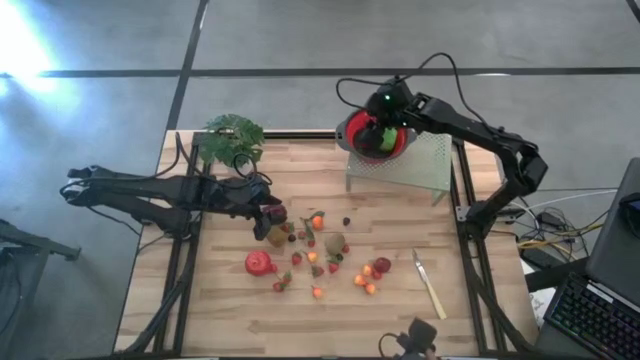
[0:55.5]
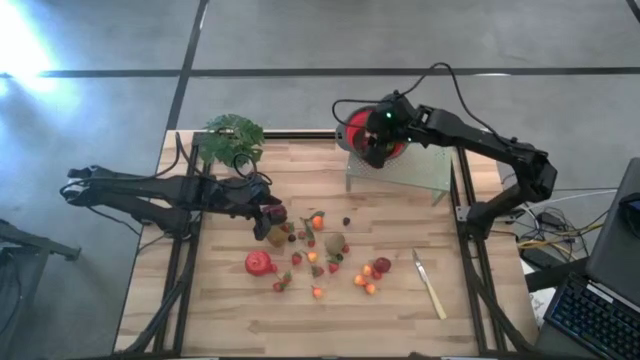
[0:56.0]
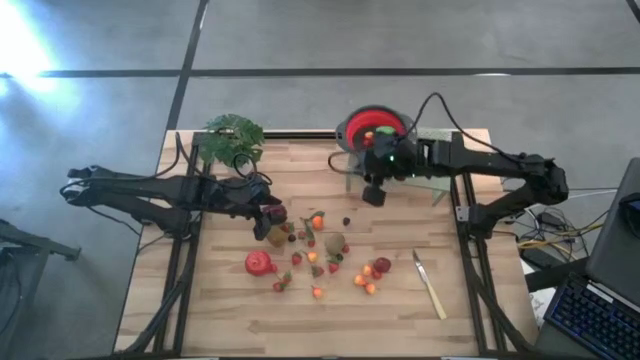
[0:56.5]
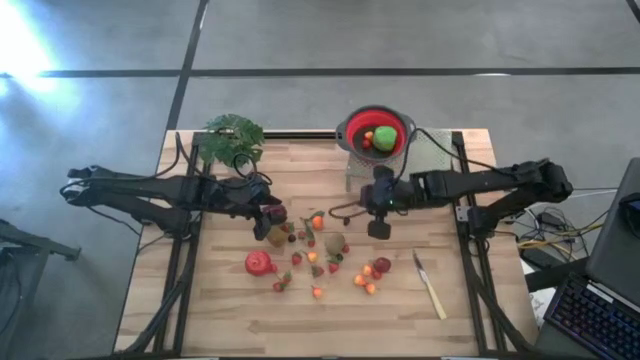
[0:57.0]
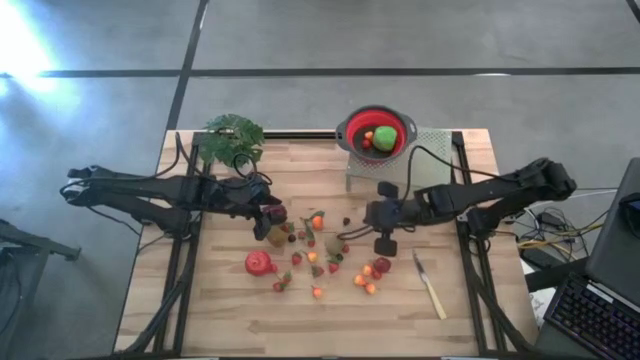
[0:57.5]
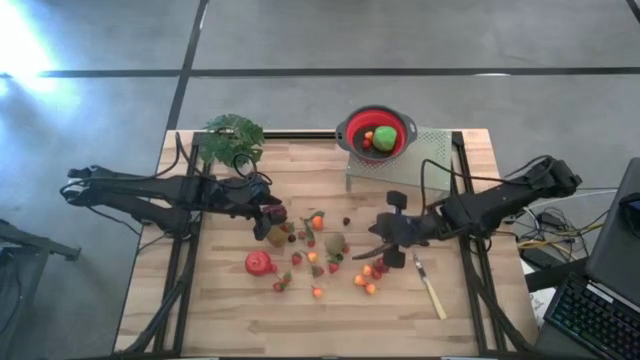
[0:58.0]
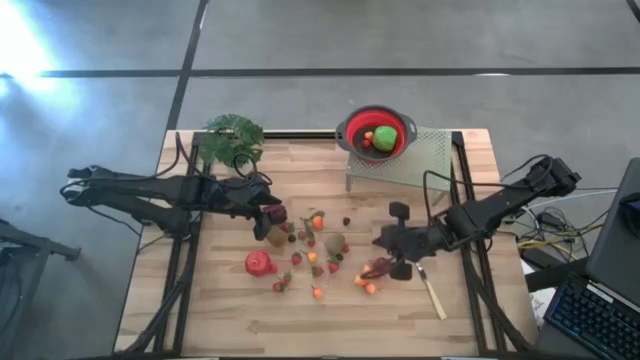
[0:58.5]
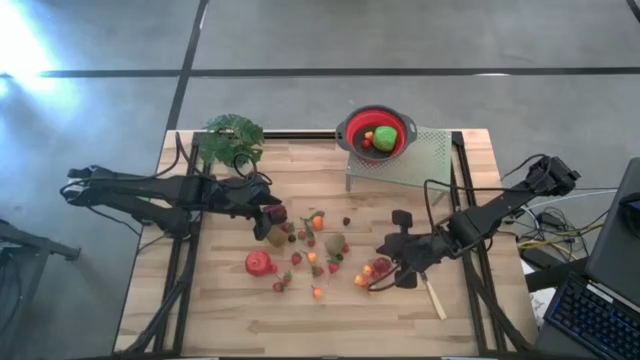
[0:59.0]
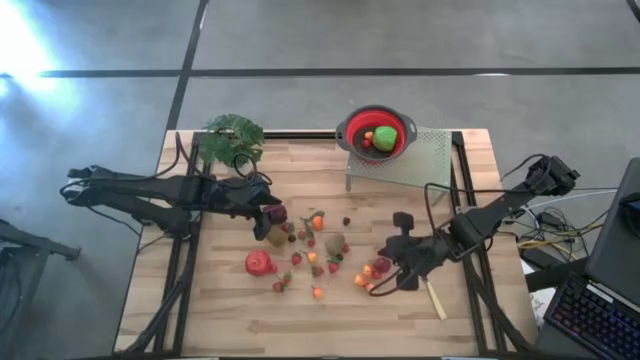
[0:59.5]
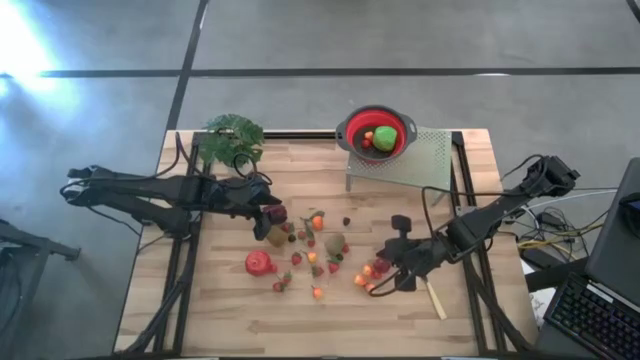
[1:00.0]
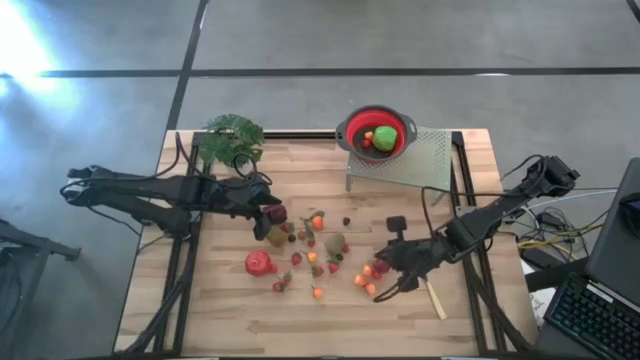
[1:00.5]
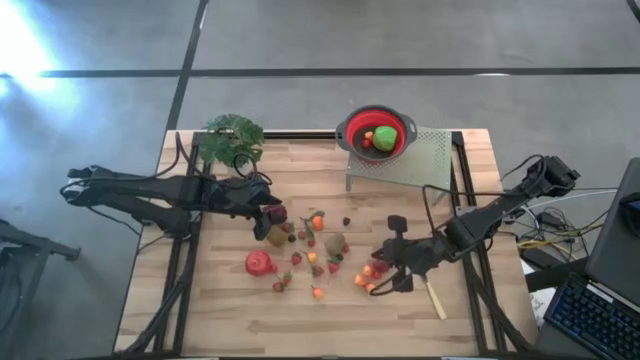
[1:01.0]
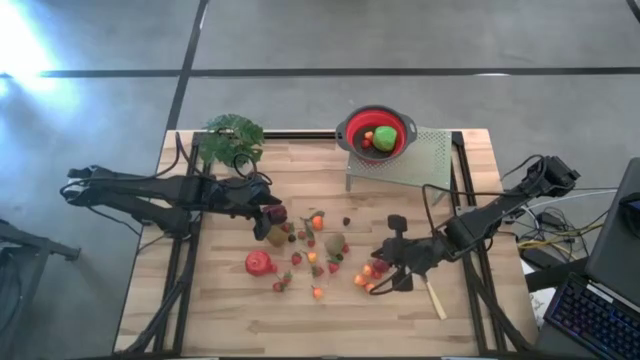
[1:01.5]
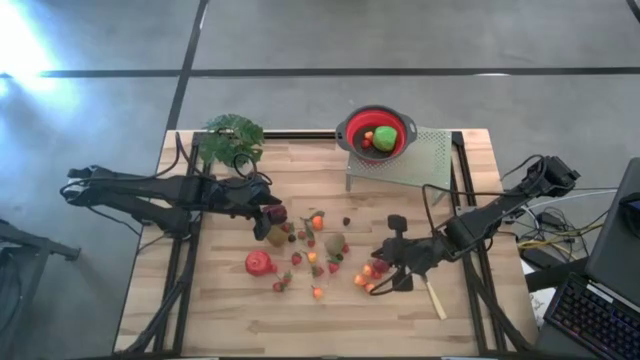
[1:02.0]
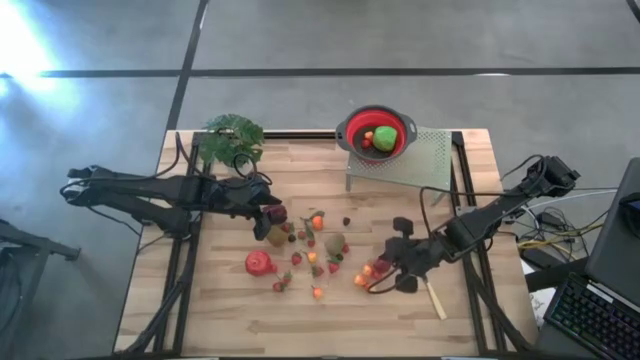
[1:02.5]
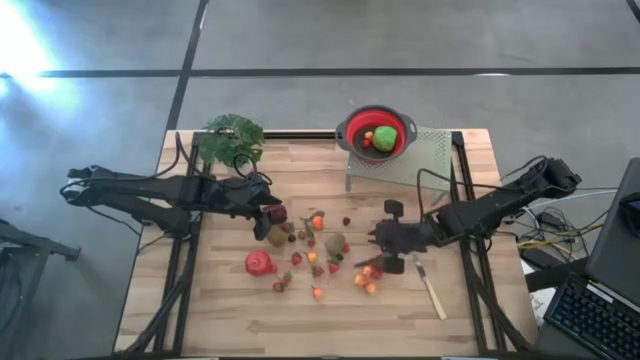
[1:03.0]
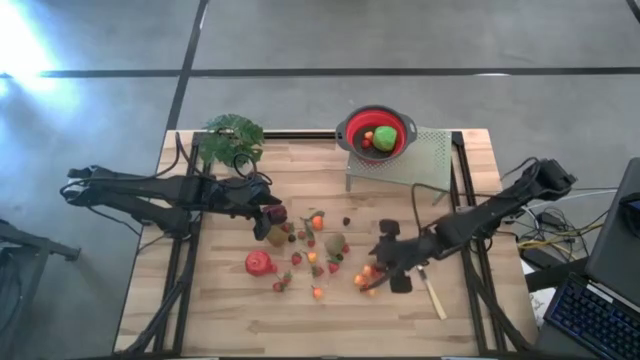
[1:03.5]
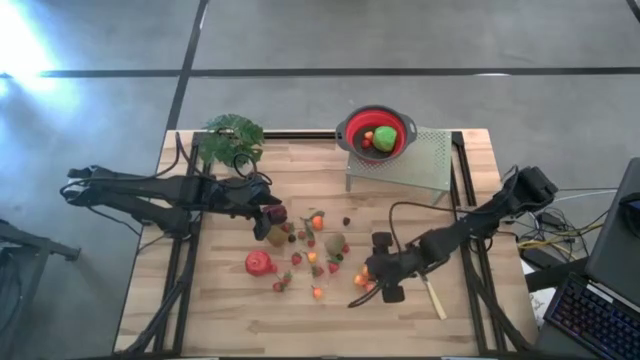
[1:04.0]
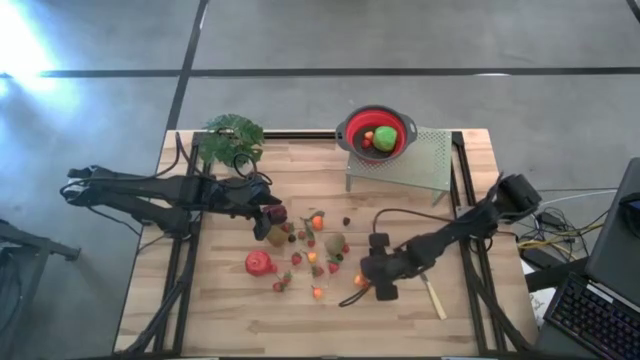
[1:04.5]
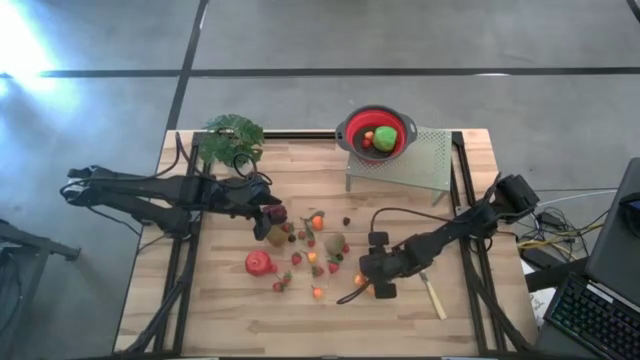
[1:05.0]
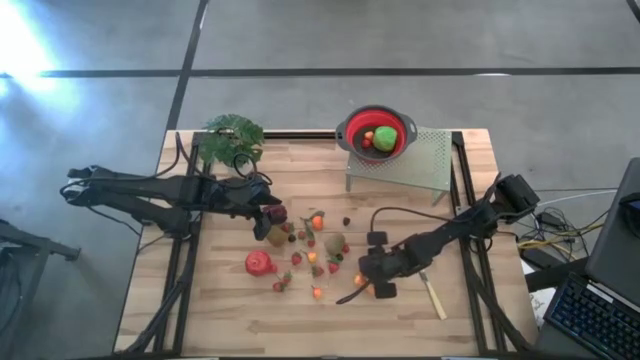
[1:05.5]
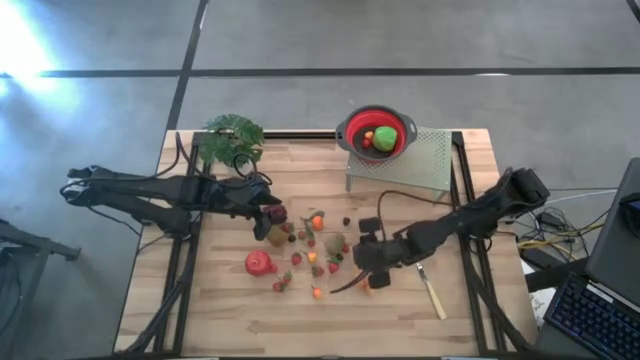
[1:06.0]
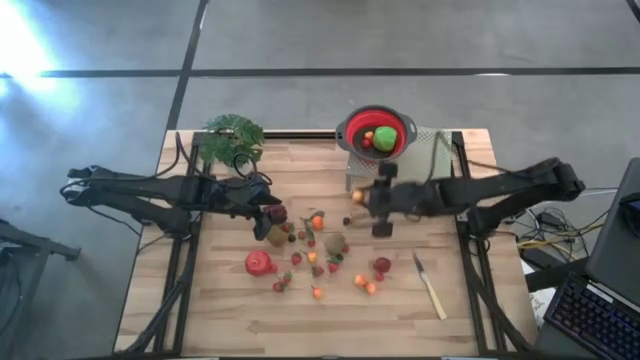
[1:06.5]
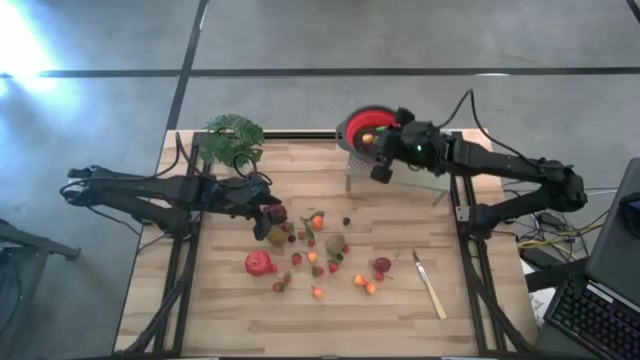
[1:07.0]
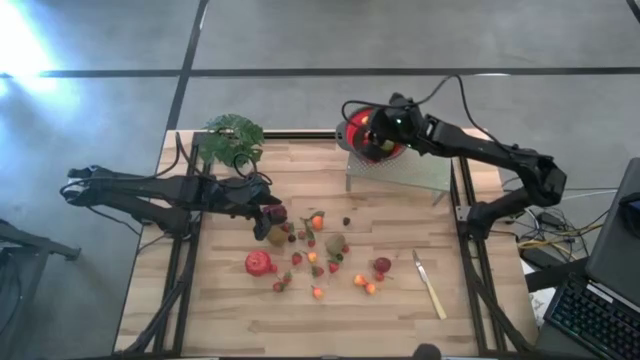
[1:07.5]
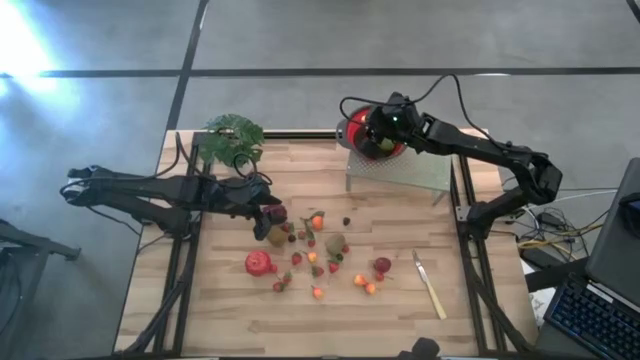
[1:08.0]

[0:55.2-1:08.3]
Task: Pick & Place Fruit
Put the pear into the strainer bowl on the shelf

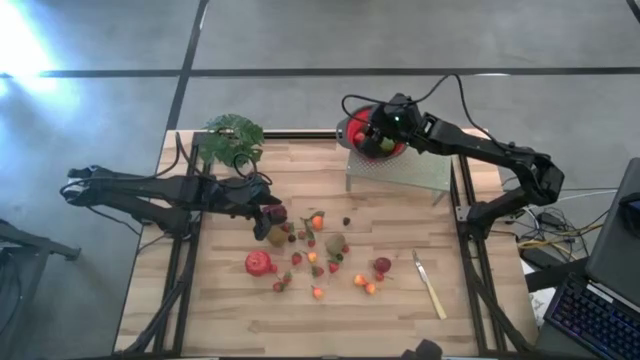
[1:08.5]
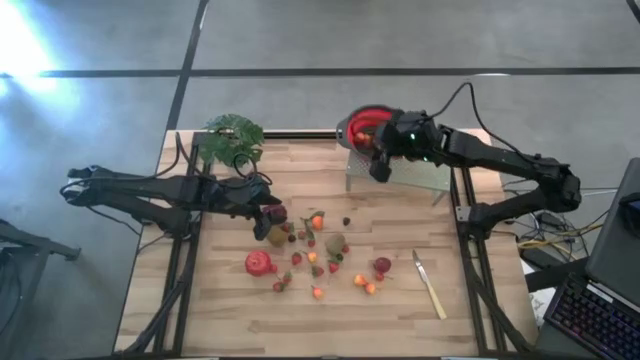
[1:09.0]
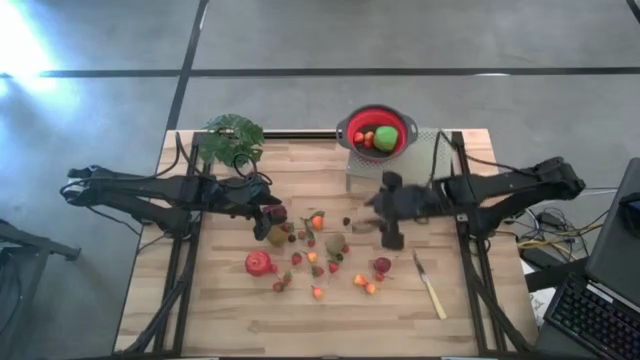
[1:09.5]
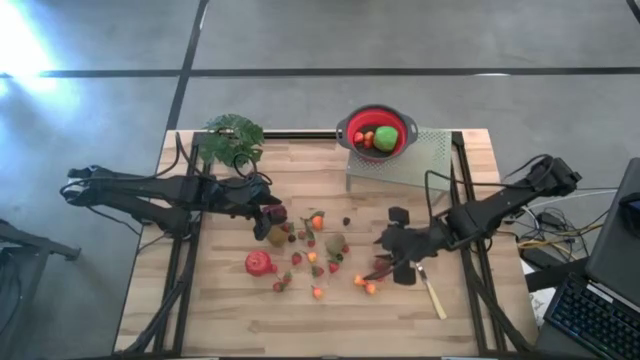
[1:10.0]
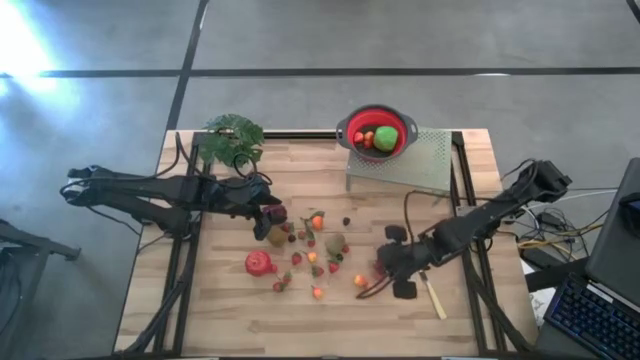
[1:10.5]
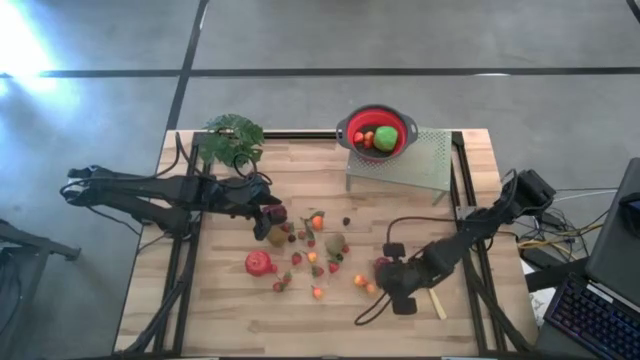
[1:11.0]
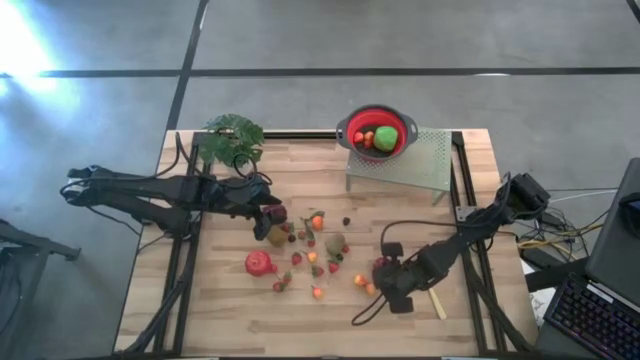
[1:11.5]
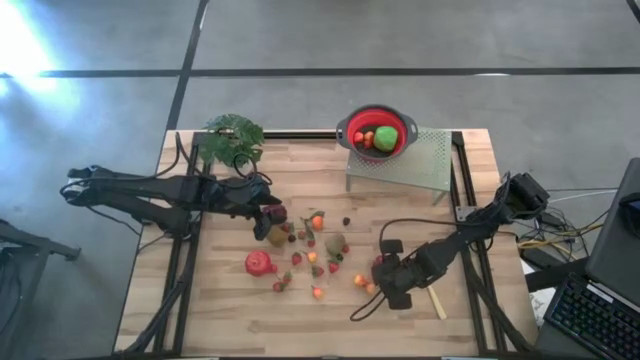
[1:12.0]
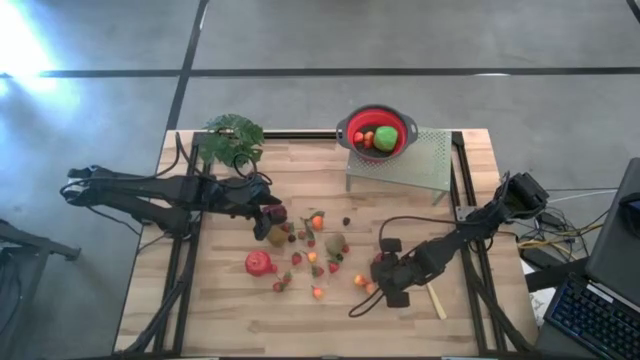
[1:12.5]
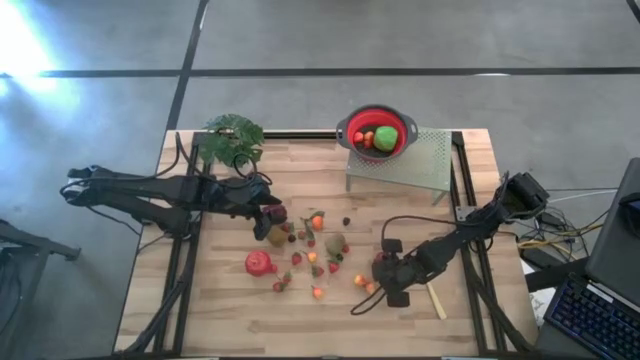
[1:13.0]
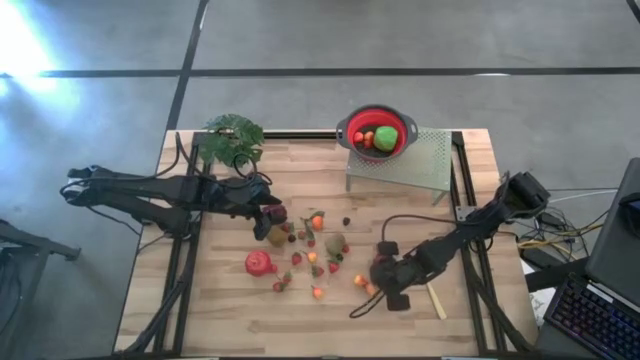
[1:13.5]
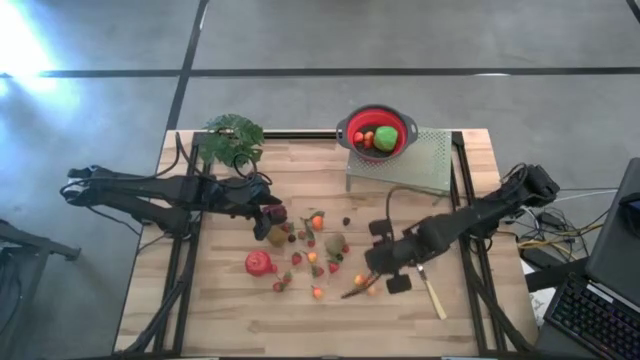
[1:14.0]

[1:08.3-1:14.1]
Put the red cherry into the strainer bowl on the shelf
